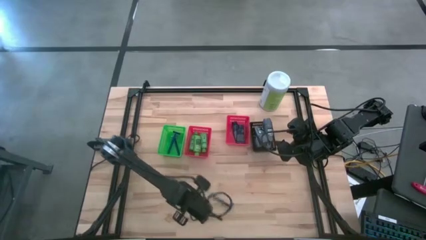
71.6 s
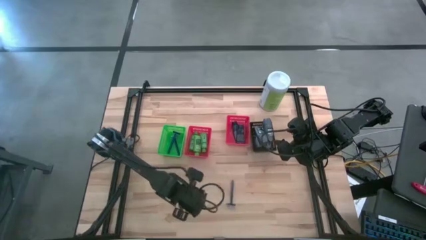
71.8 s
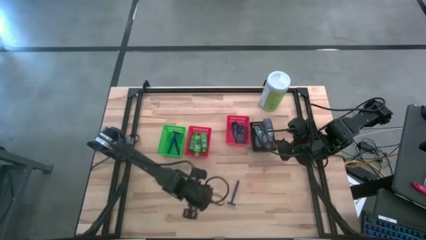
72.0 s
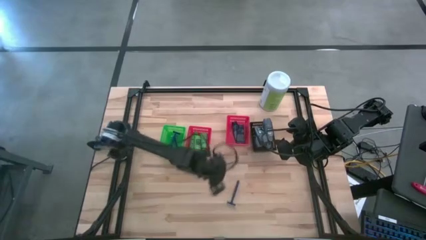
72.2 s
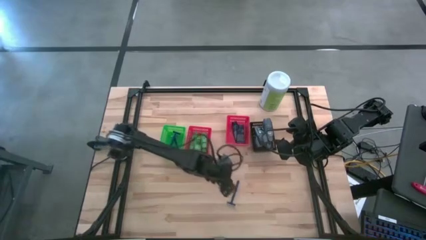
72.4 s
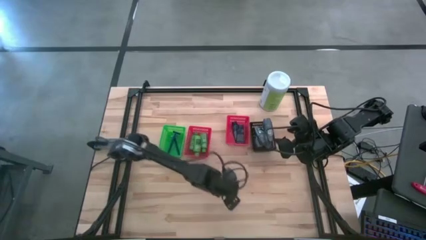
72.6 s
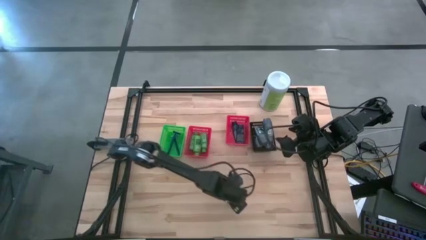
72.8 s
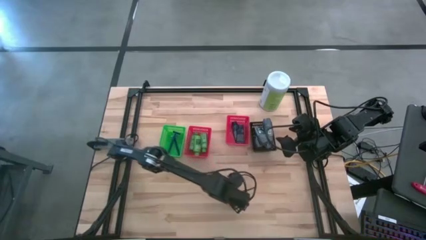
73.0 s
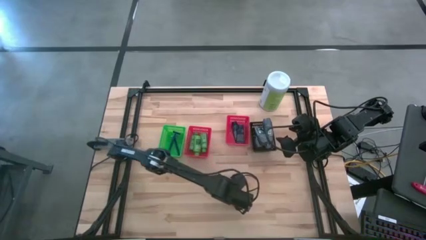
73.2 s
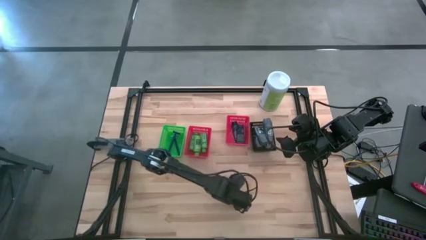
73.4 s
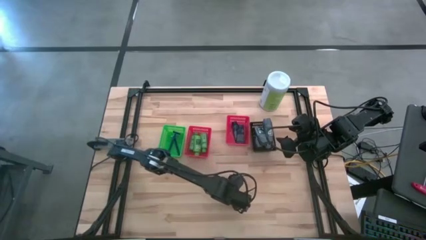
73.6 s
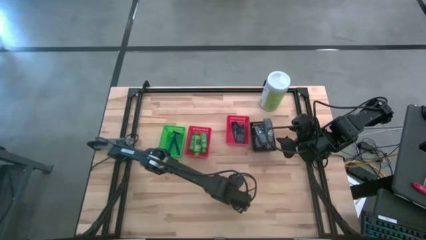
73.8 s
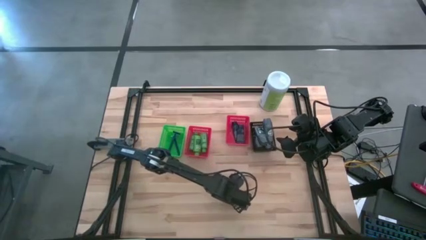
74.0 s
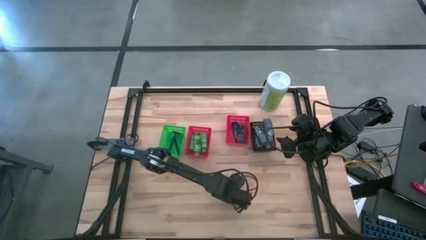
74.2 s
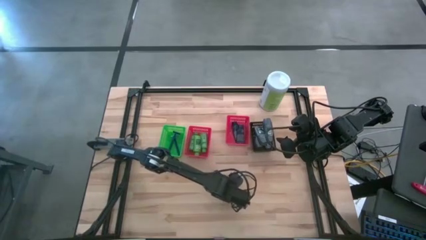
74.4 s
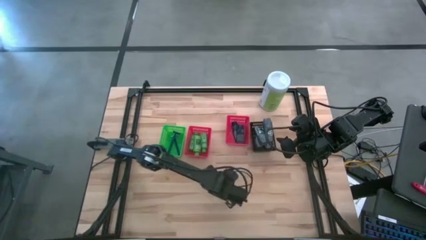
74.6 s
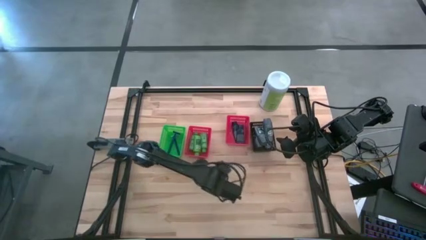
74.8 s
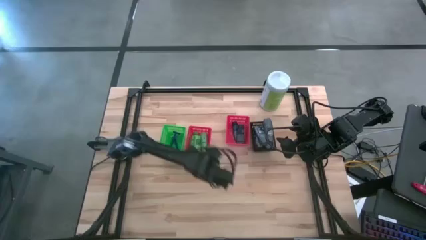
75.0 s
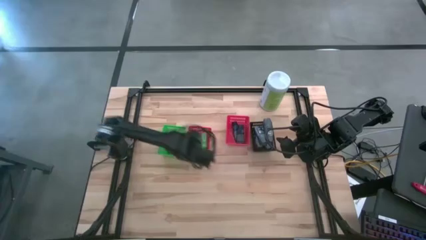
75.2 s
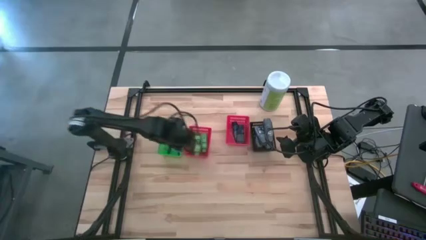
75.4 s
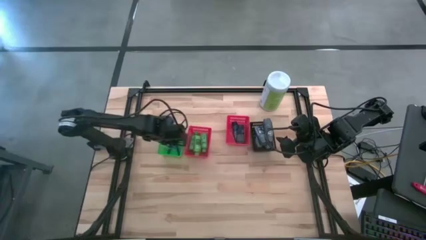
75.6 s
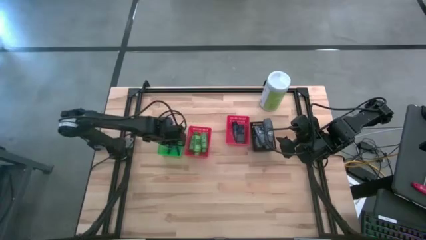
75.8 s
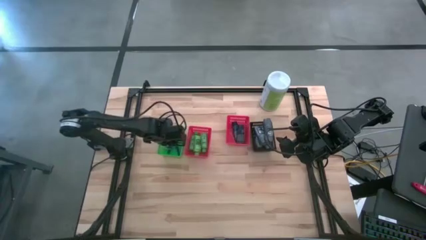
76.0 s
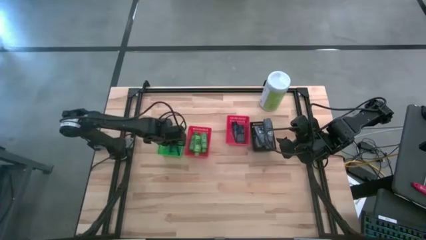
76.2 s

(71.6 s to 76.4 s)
Task: Pick & Place Travel size toiletries
Put the blue razor into the green basket

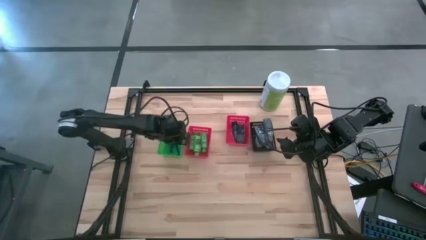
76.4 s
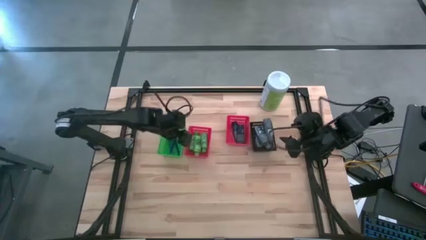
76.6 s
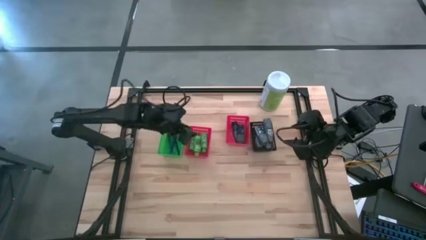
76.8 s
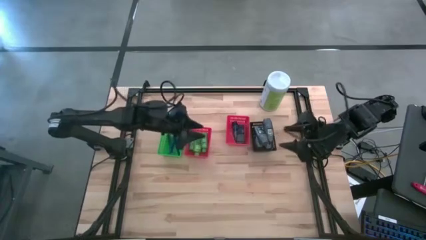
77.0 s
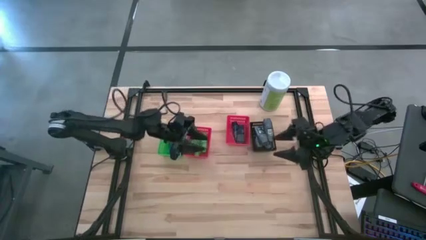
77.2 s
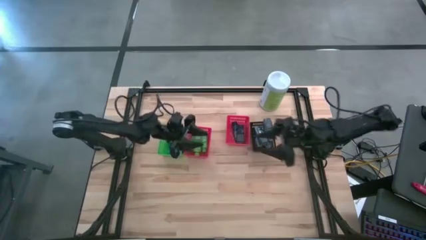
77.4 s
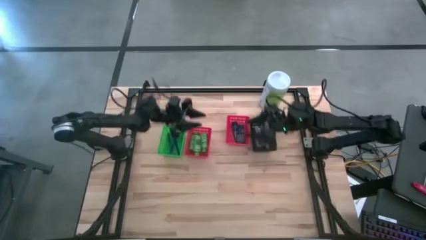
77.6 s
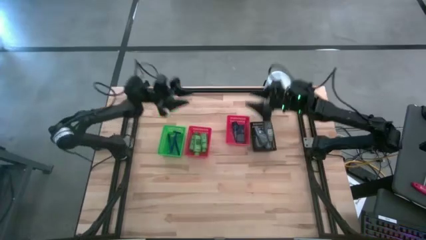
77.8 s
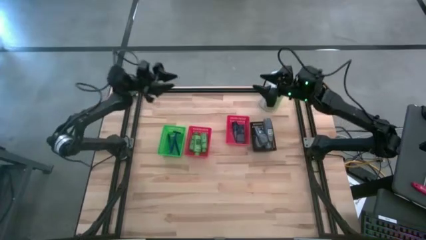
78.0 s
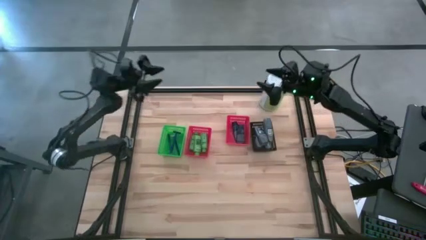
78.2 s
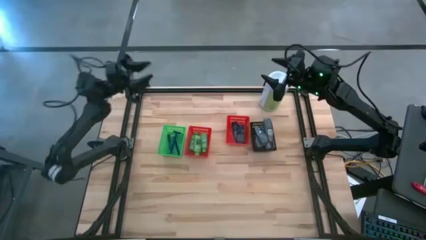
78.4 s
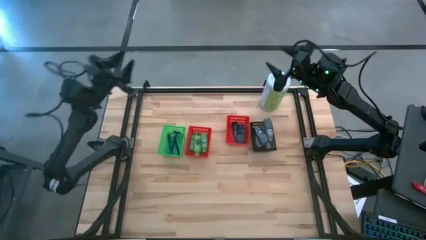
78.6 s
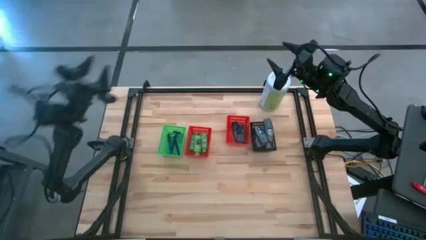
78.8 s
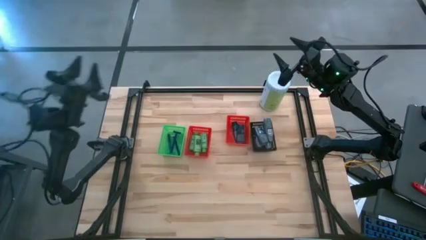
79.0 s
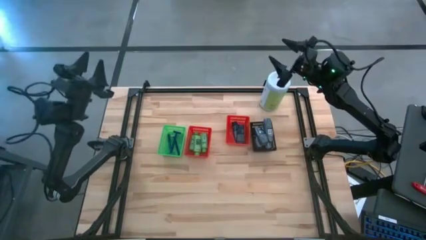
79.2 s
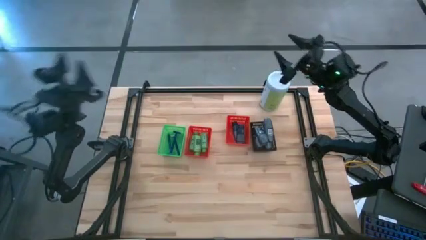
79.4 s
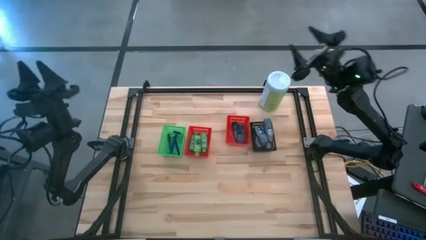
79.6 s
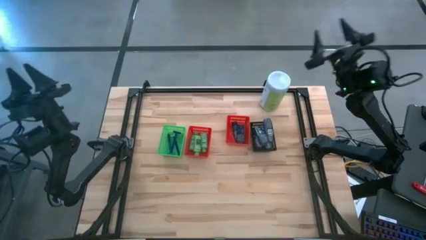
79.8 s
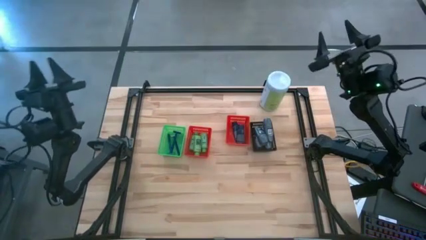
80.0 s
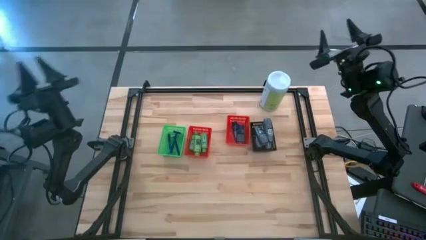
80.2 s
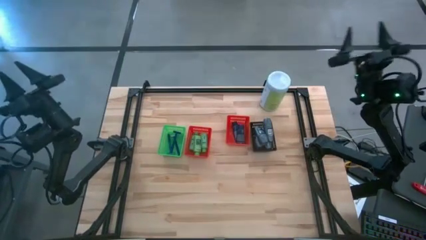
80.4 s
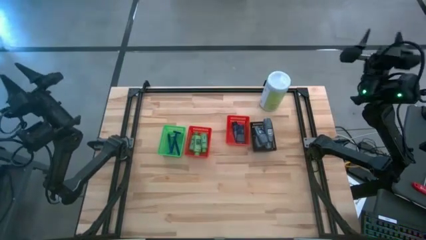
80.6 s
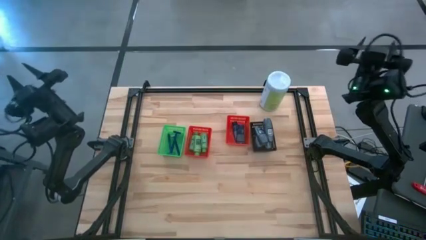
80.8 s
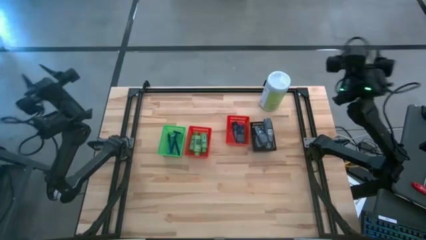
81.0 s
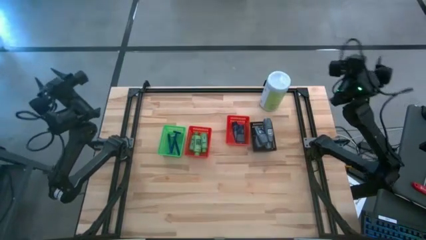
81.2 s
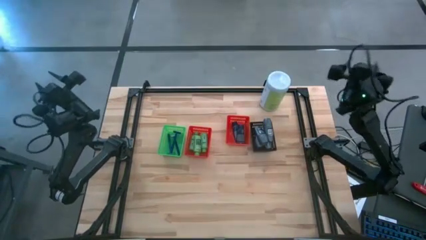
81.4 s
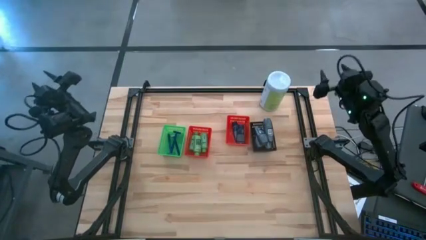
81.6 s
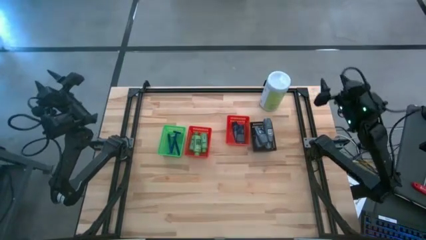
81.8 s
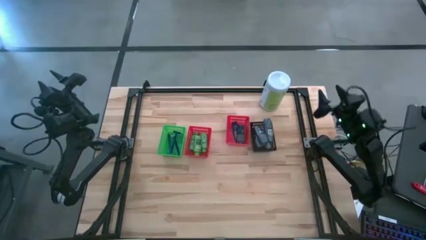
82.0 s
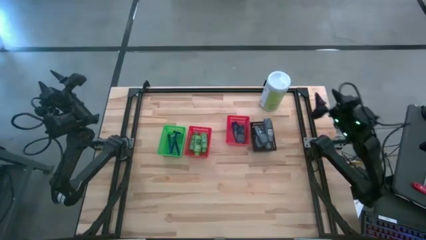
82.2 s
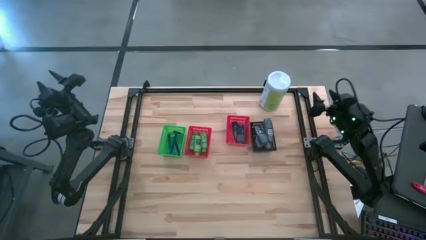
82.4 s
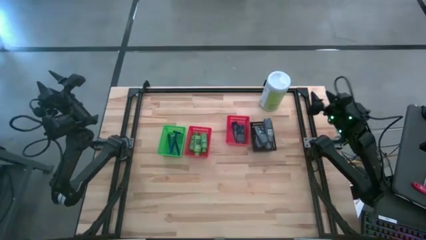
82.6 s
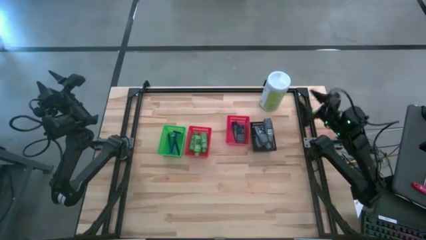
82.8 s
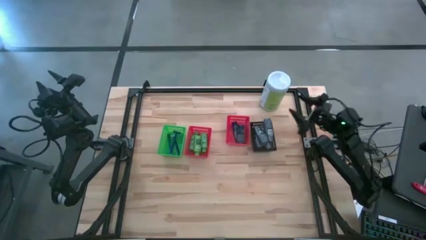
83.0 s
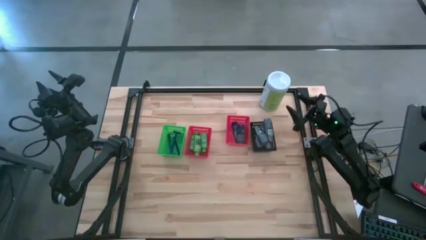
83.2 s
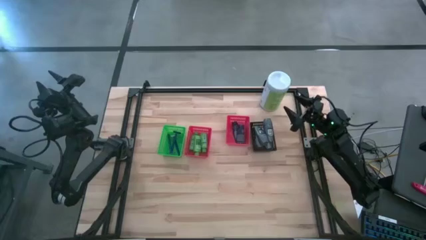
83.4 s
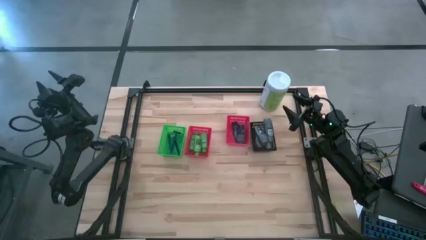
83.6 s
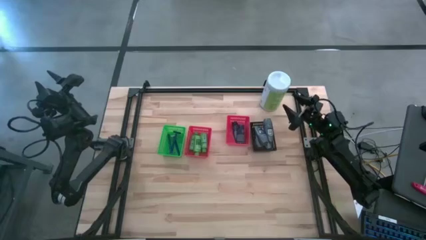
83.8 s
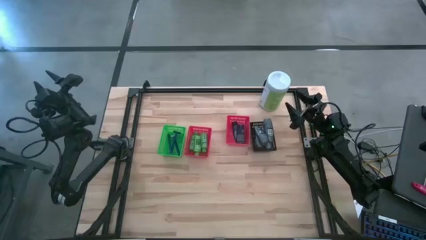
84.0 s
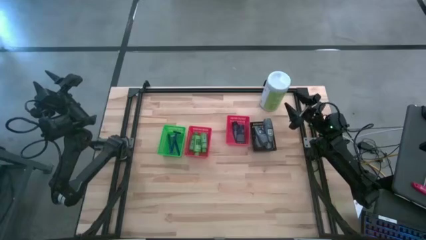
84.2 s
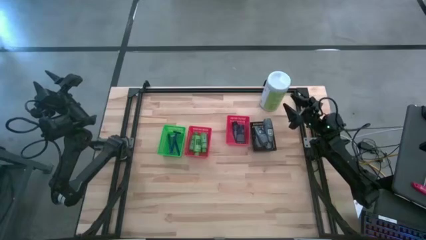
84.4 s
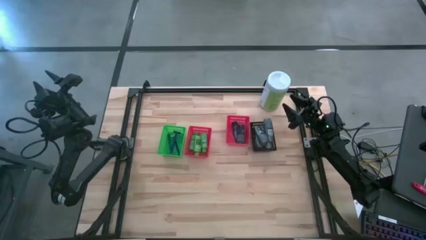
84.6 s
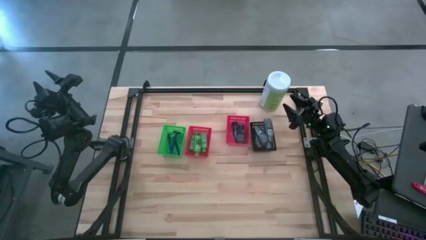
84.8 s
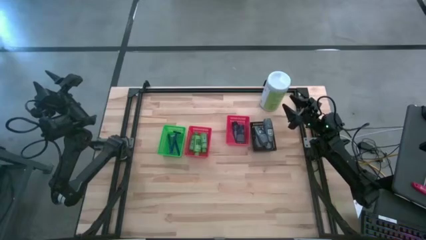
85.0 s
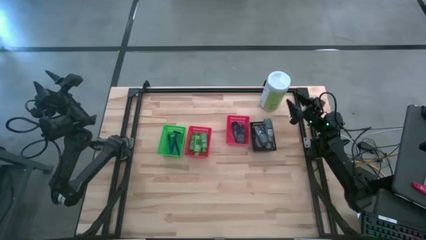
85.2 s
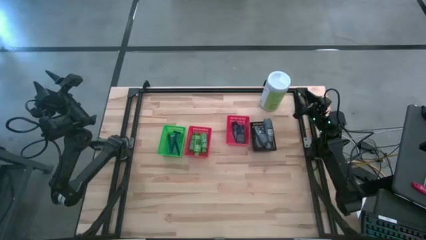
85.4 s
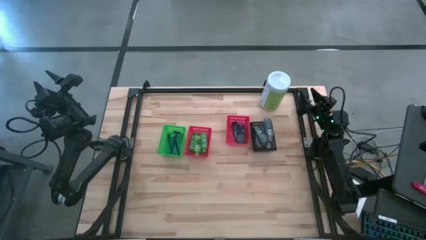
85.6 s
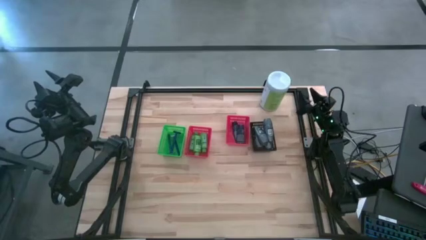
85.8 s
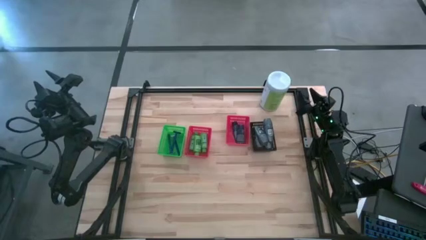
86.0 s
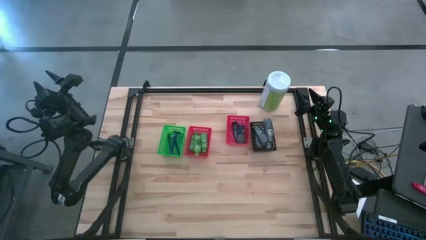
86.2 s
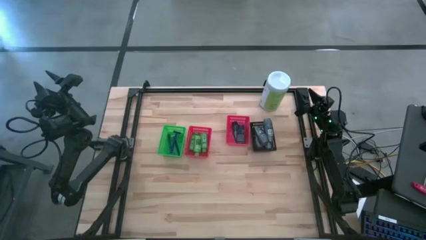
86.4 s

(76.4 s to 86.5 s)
Return to Home Position

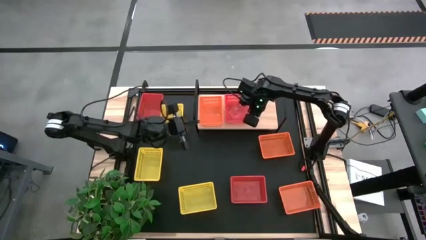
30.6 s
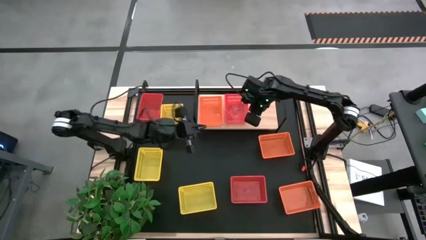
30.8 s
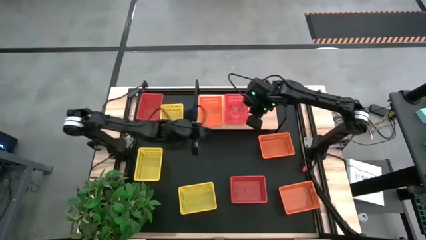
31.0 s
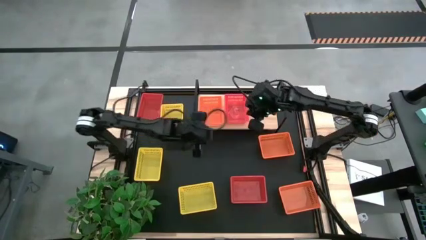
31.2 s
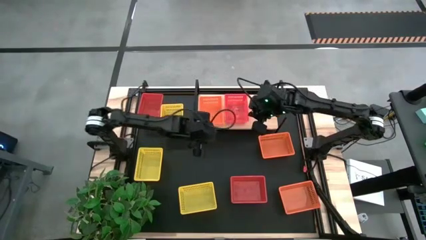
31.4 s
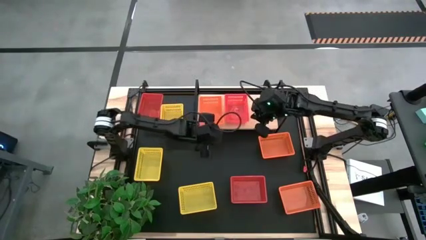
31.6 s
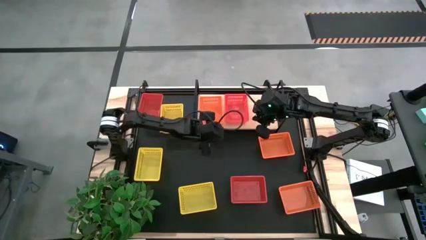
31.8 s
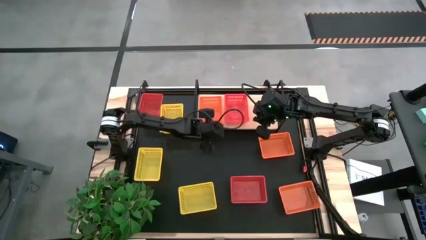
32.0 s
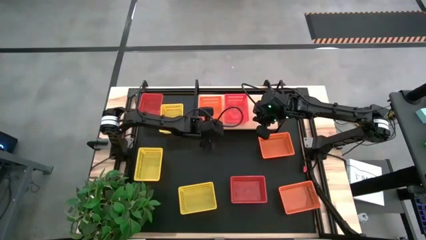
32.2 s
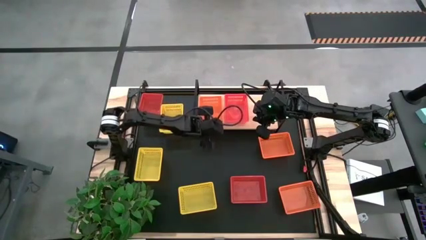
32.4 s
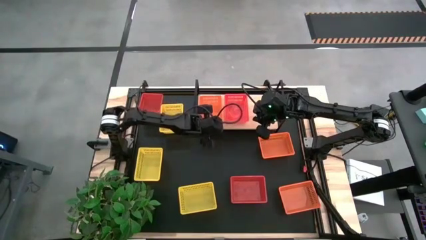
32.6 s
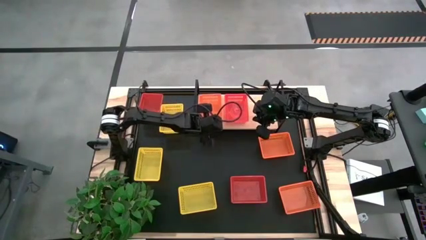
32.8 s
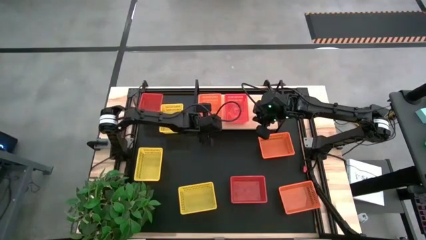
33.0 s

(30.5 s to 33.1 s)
Task: Stack baskets on shelf by color
Adjust the orange basket on the shelf
